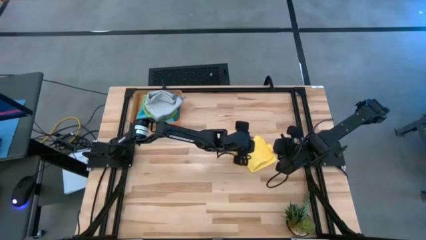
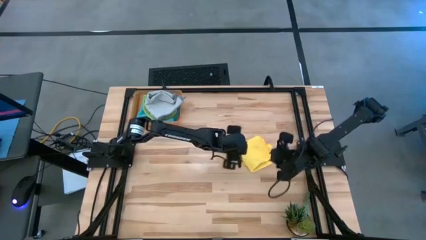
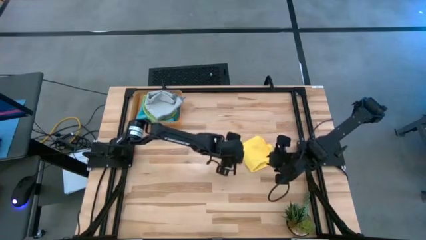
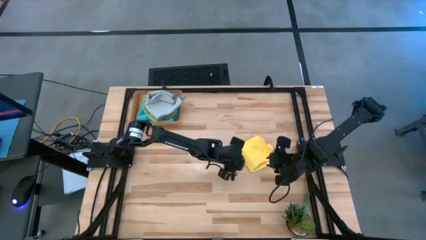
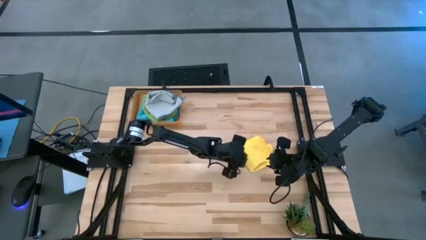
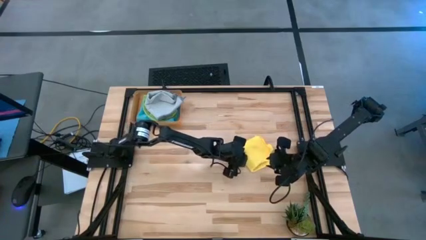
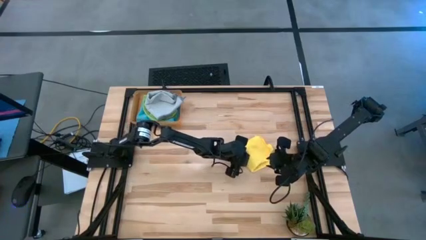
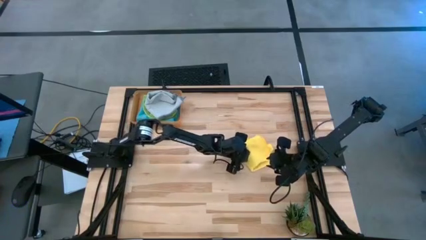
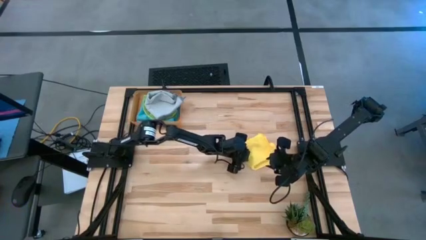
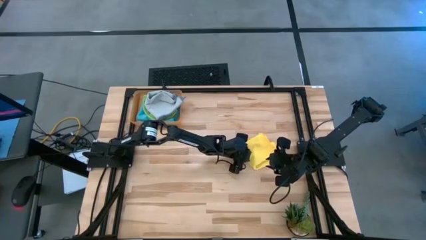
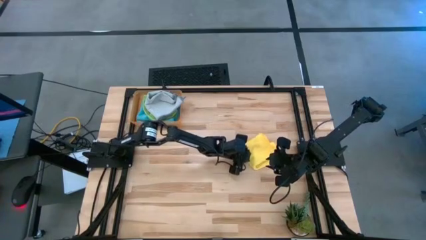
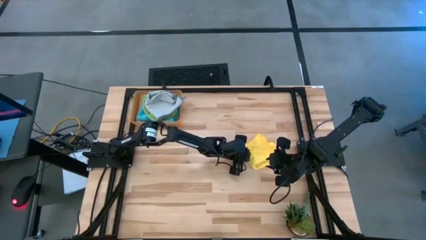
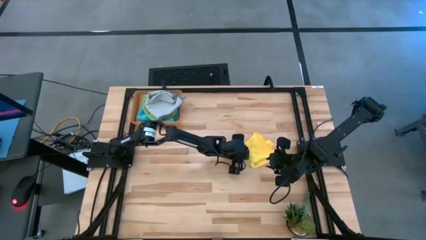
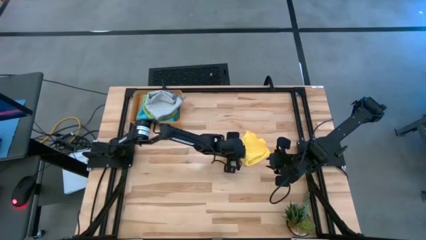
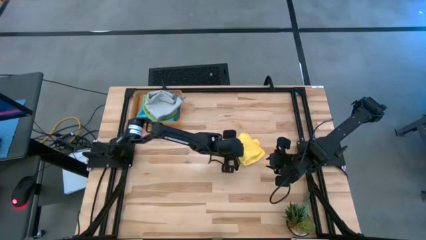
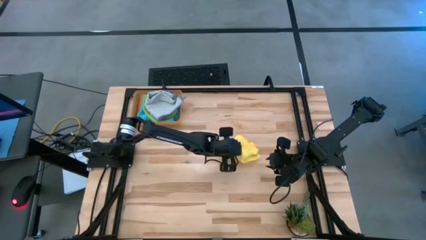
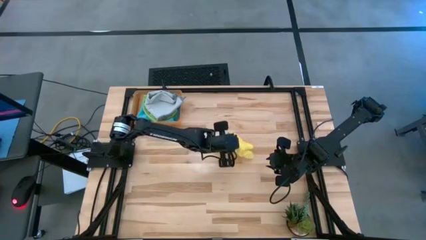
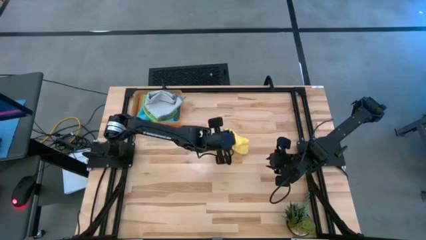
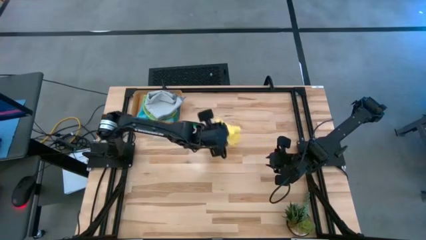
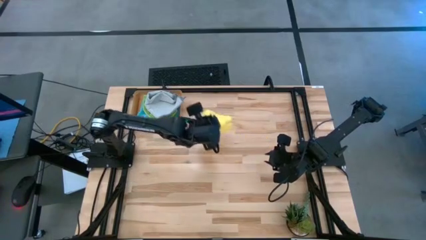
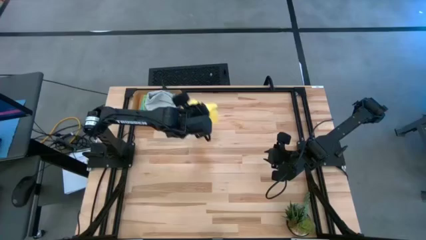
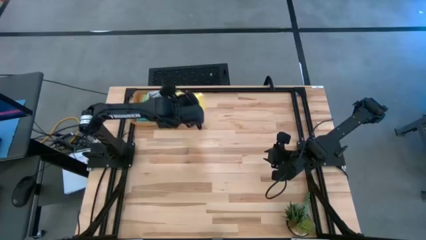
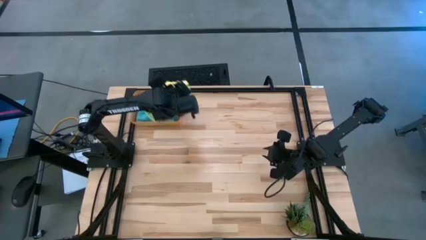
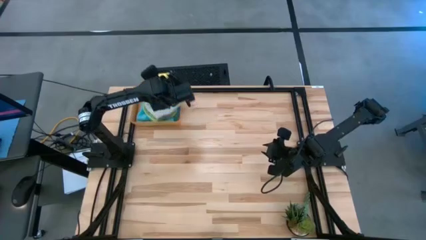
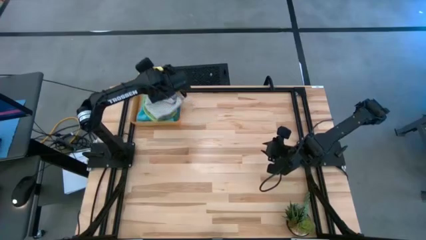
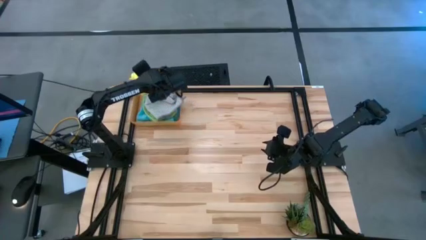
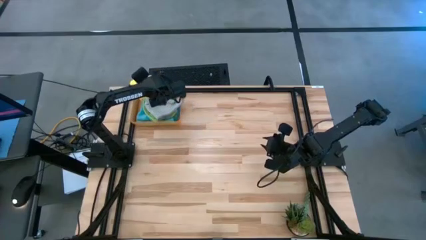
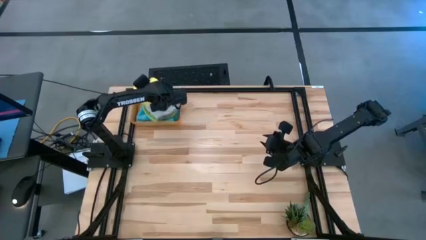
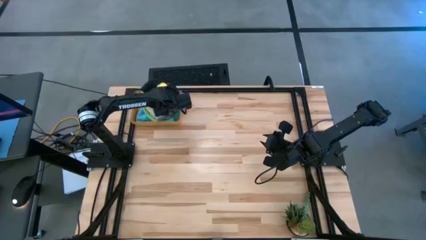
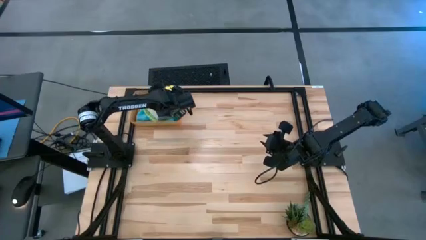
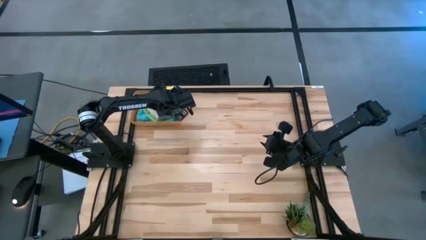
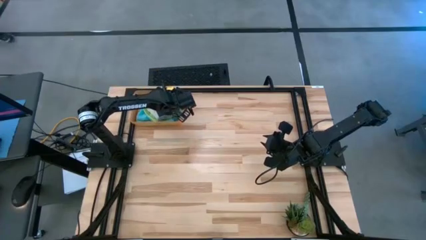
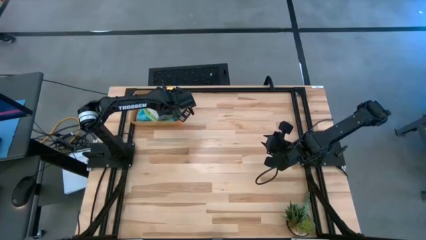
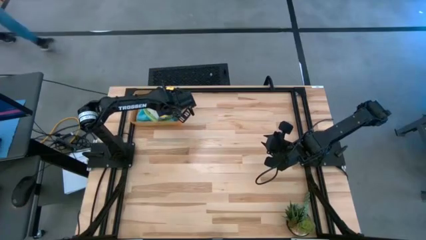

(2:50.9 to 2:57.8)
Task: Fold microfiber towels
Put the yellow microfiber cloth into the orange bin

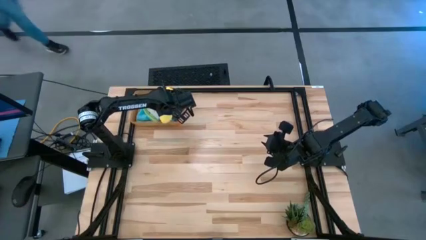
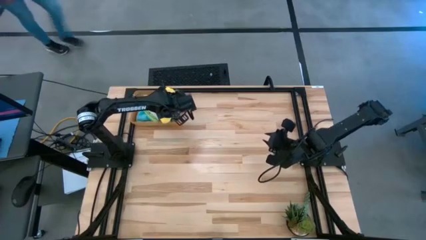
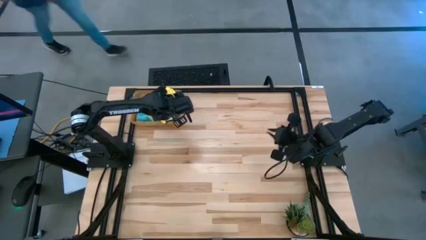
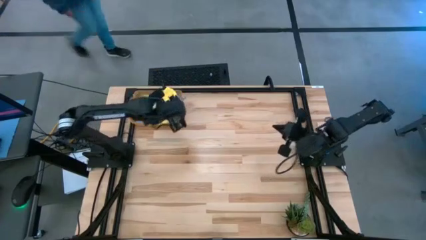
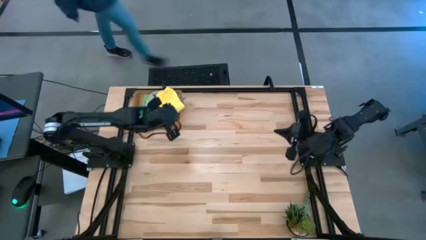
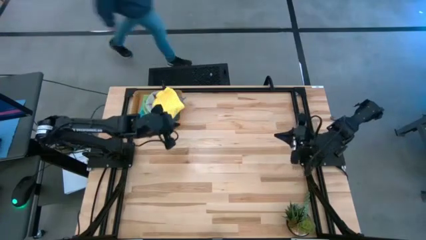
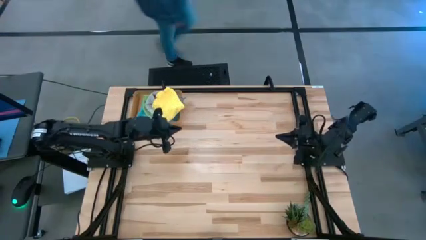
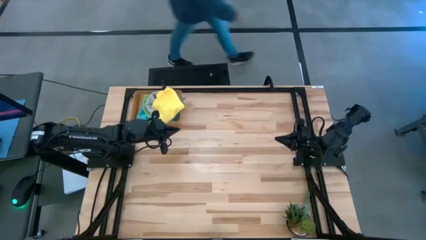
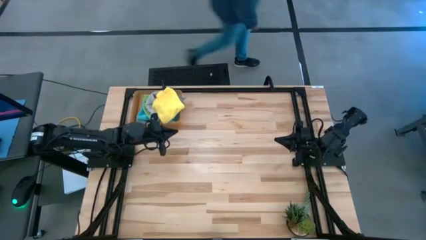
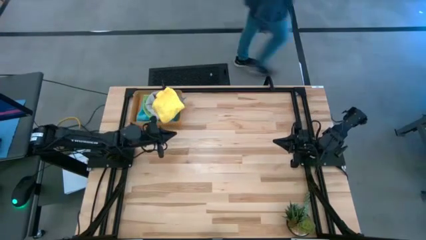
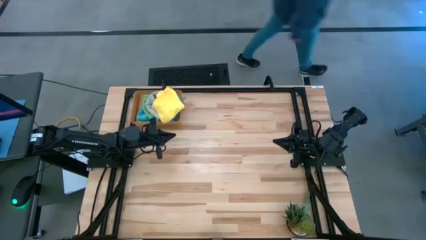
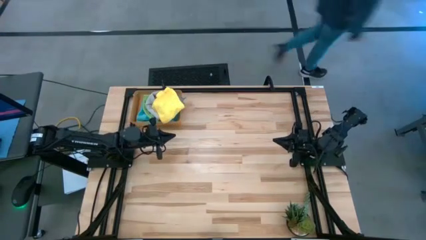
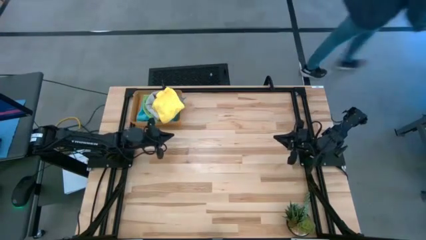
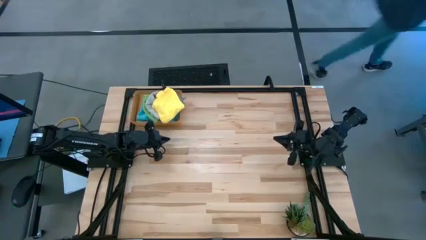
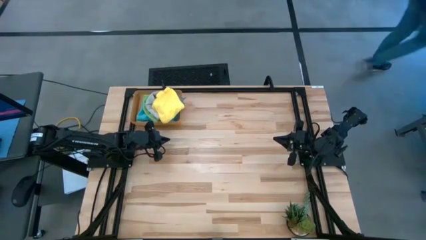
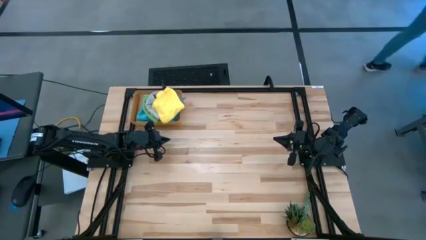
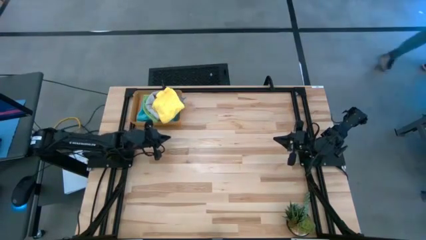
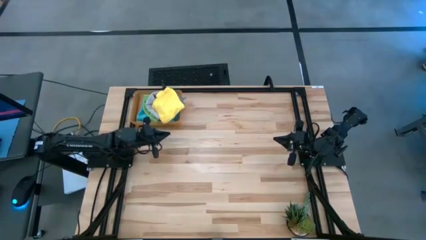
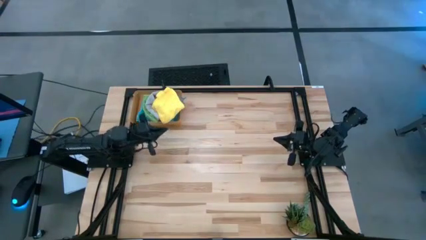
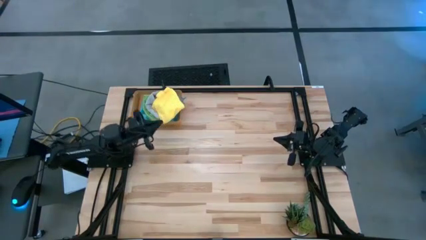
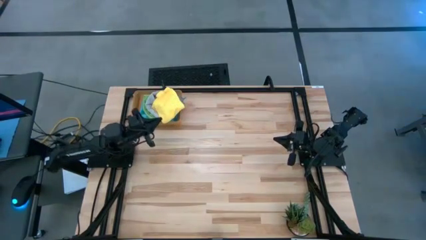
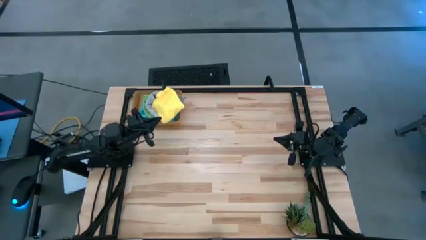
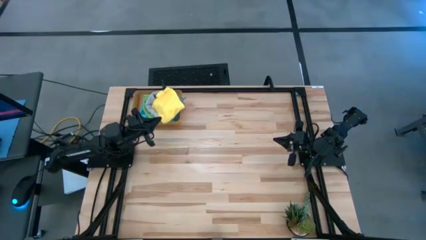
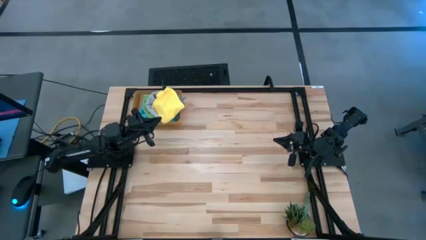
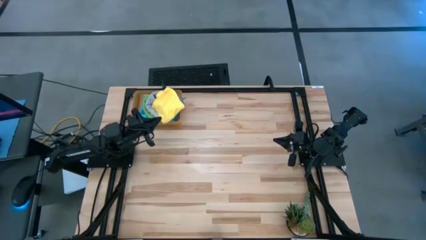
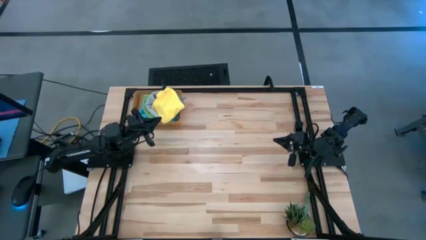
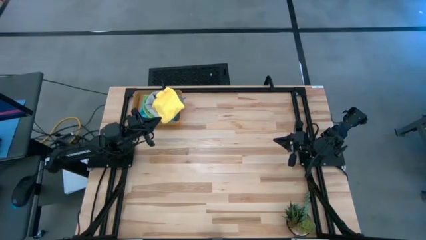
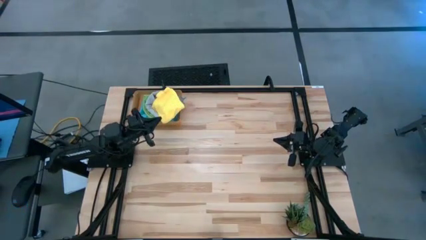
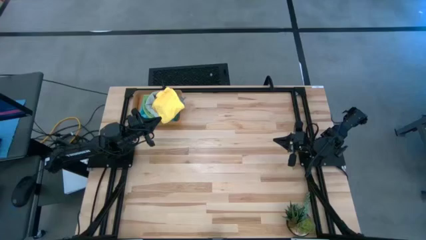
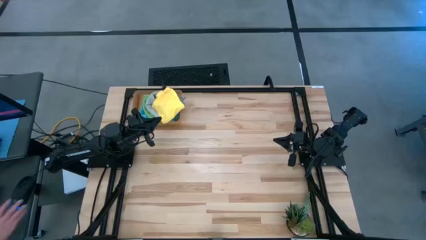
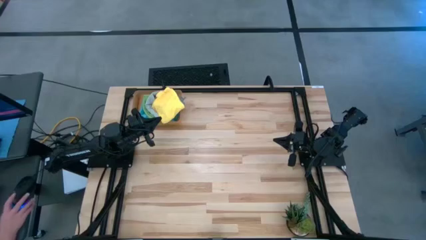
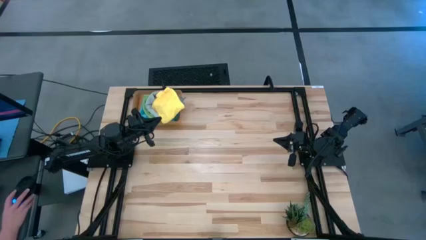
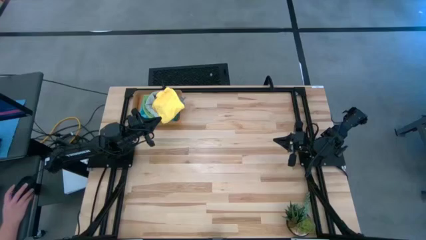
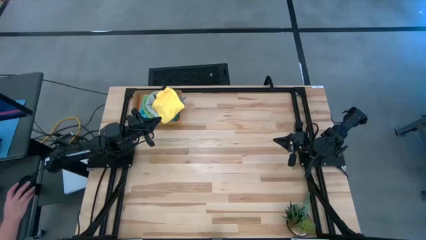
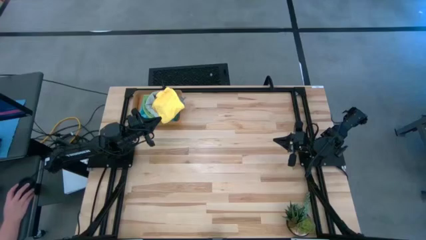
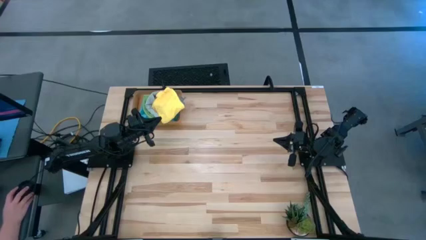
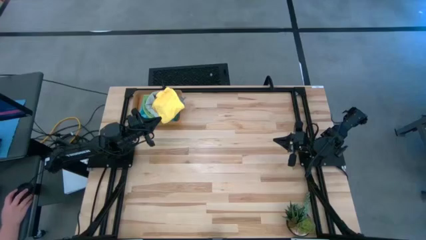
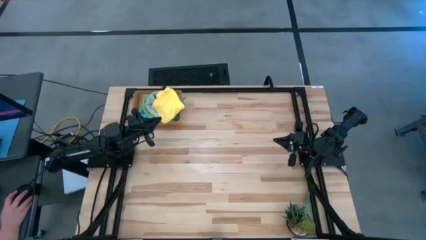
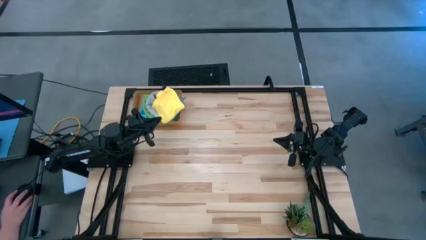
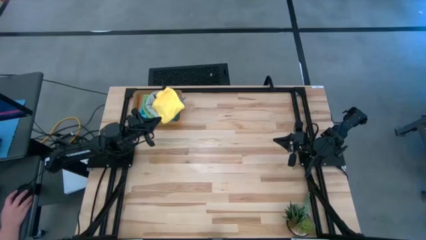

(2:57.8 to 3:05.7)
Return to Home Position

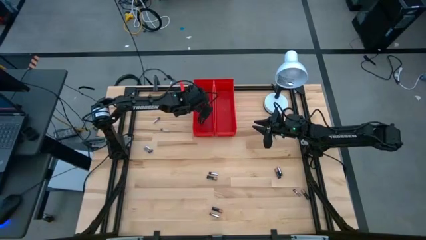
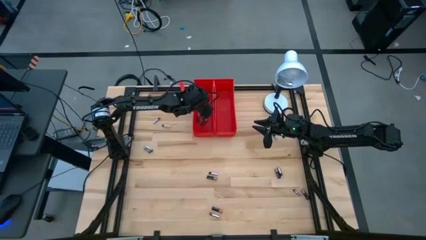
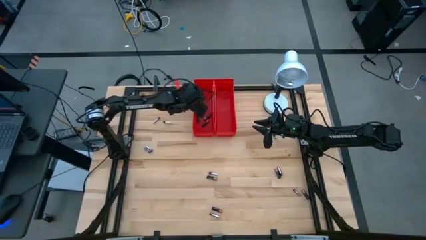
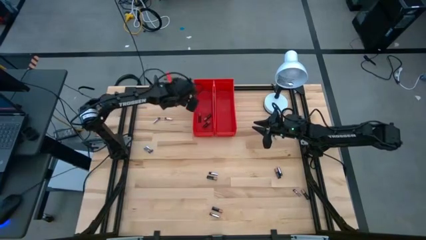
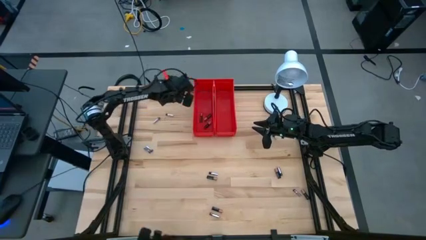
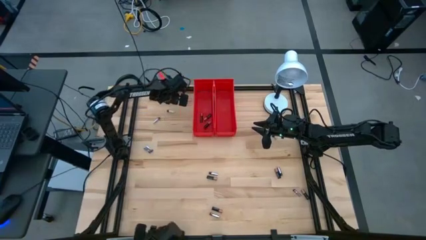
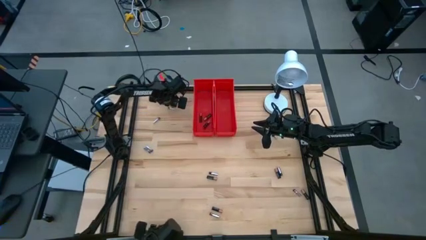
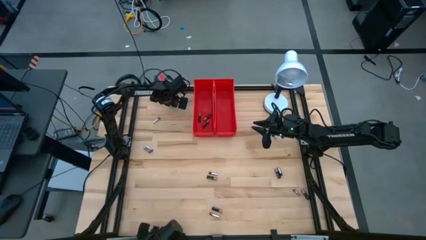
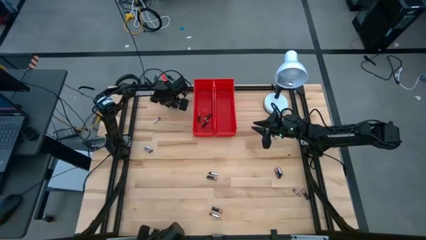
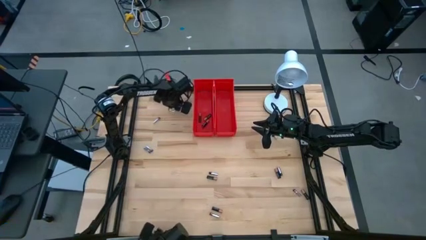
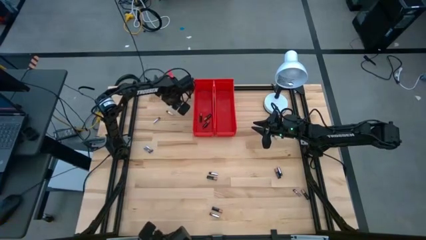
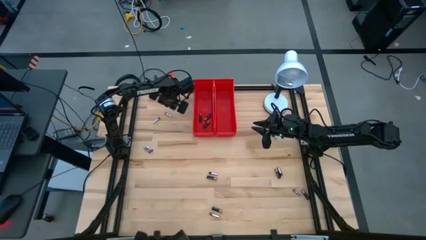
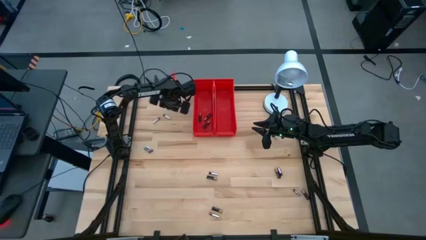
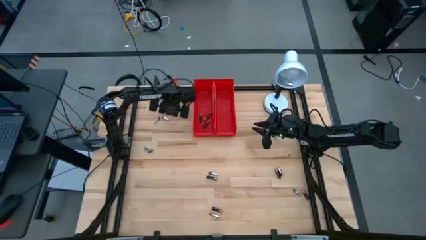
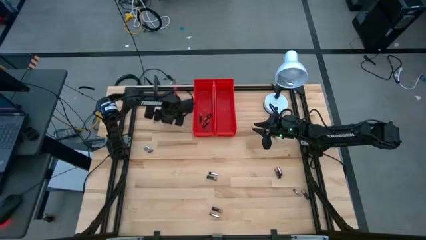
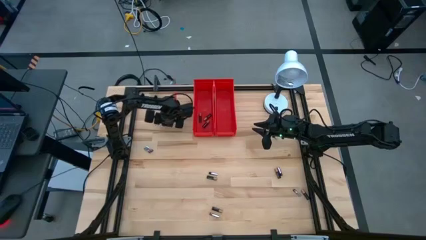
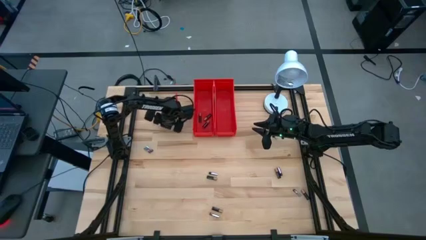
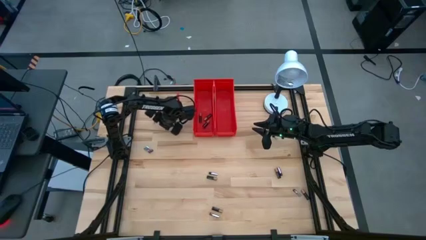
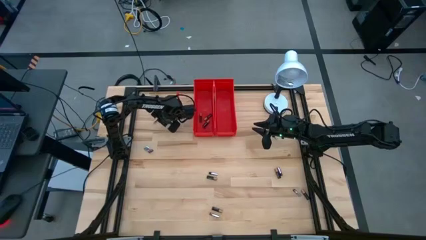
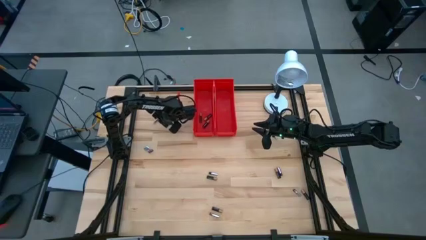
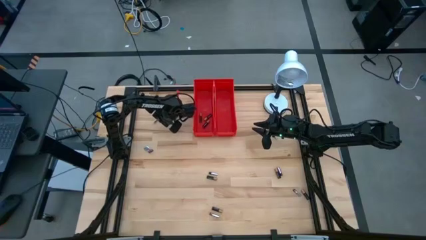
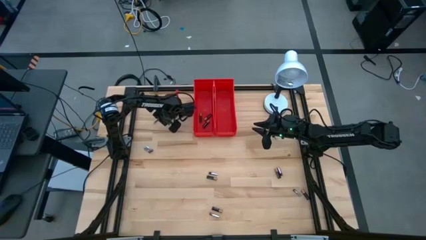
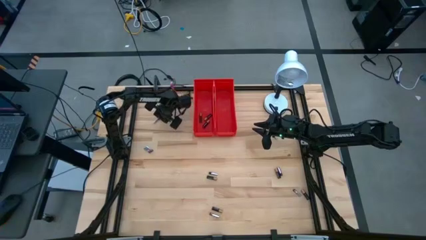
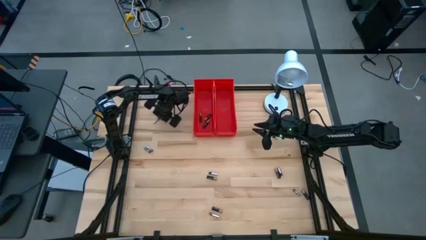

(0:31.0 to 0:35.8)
Task: Sort batteries
Put the silver battery into the right red bin
